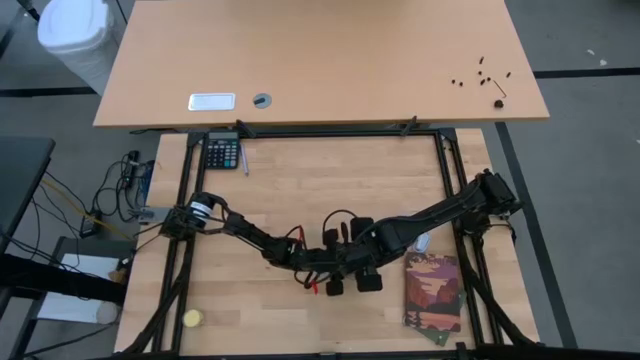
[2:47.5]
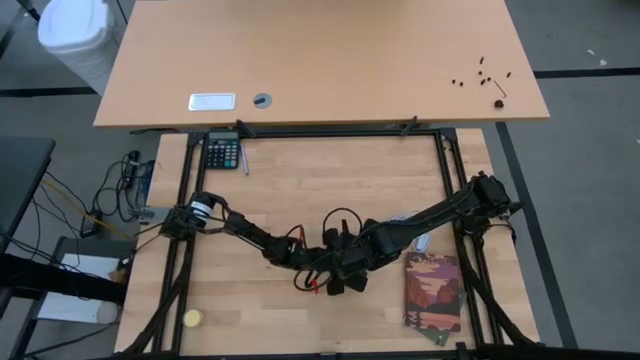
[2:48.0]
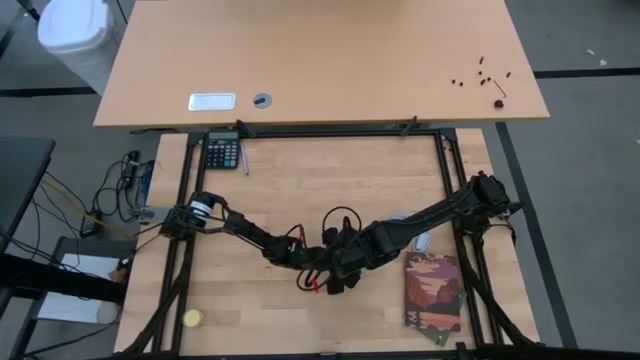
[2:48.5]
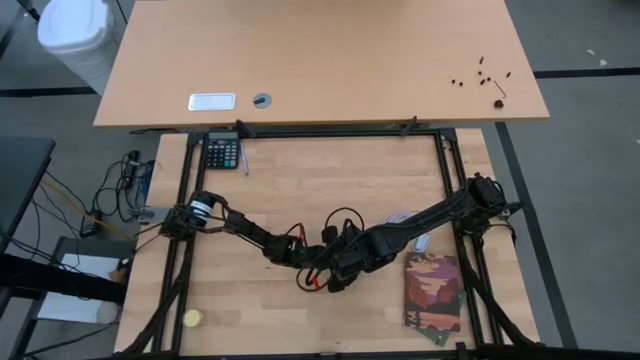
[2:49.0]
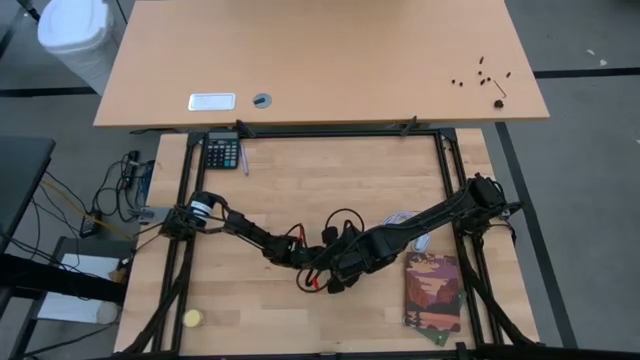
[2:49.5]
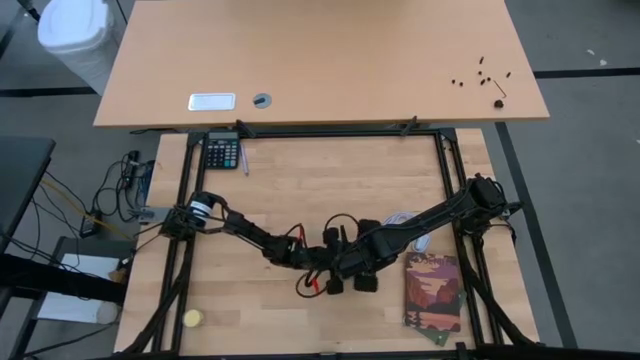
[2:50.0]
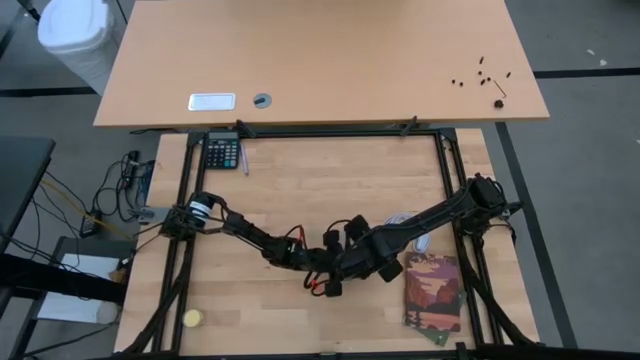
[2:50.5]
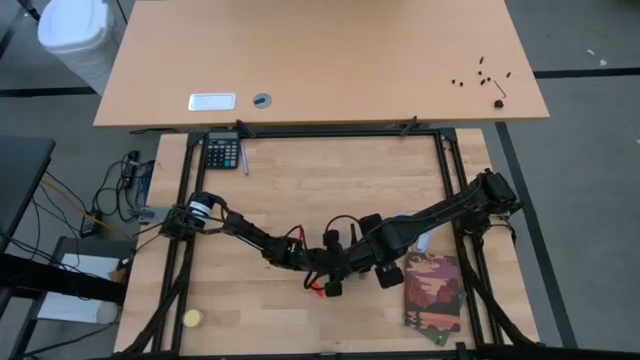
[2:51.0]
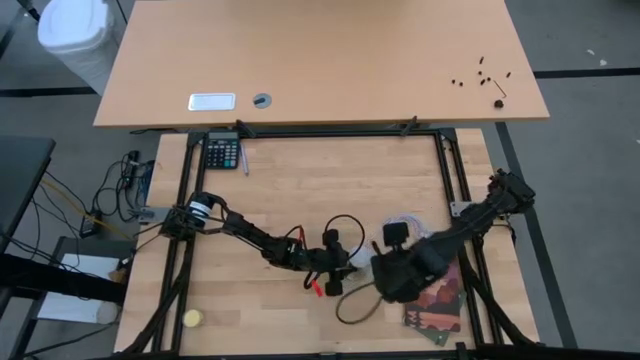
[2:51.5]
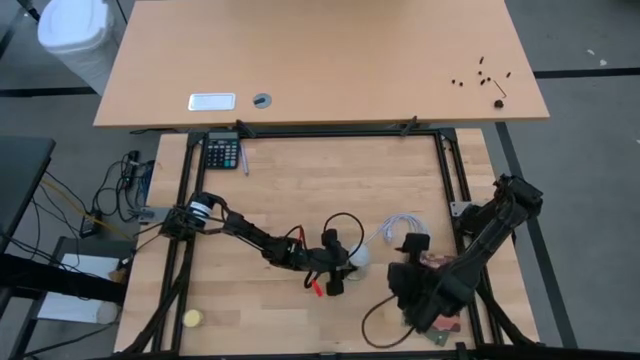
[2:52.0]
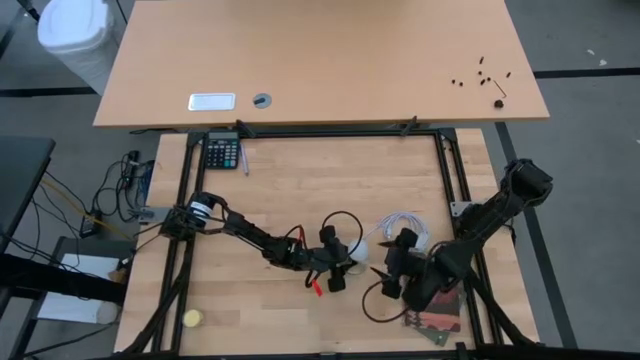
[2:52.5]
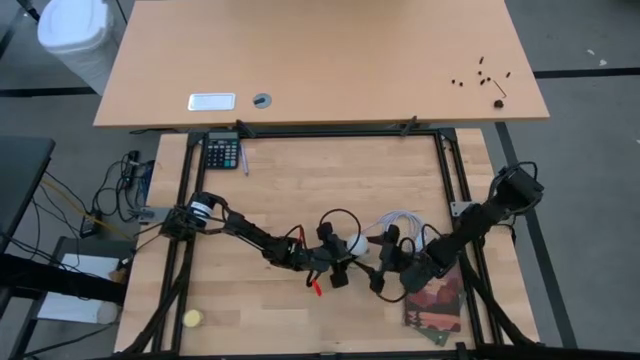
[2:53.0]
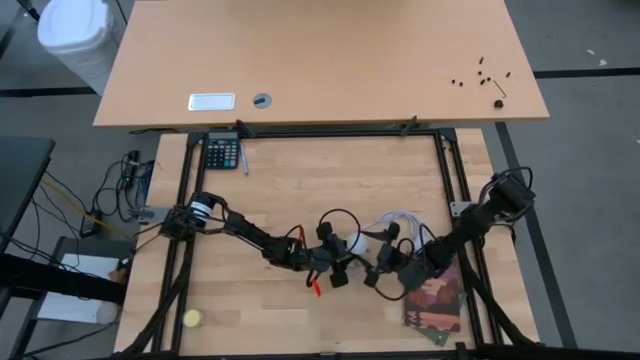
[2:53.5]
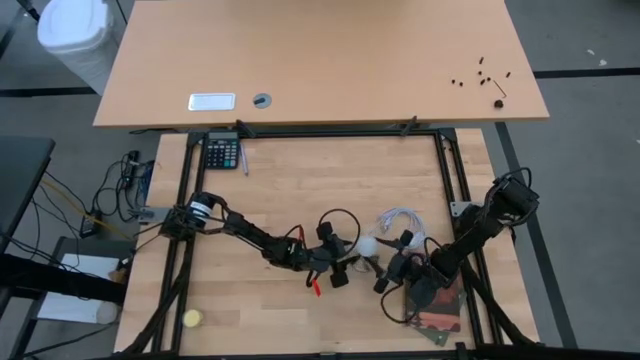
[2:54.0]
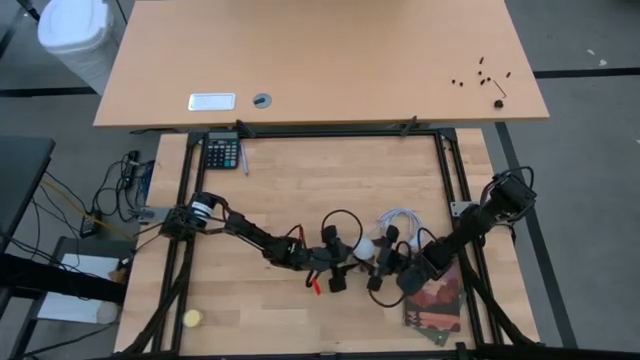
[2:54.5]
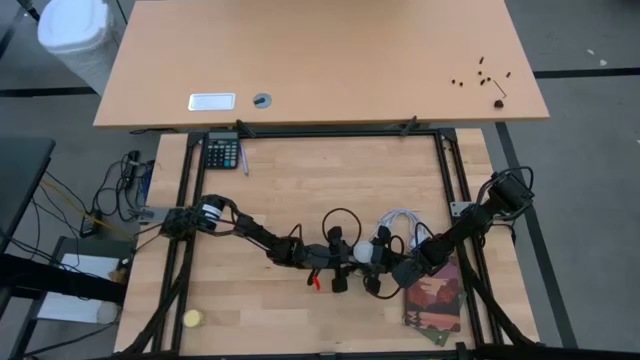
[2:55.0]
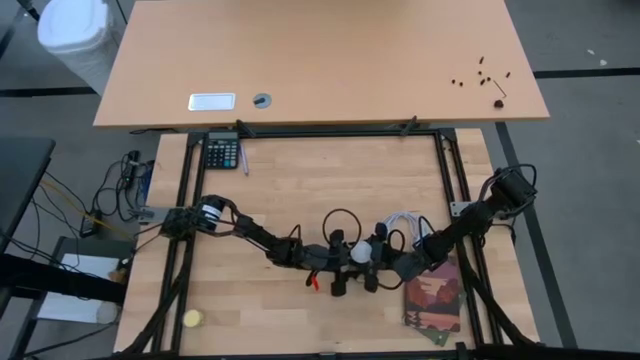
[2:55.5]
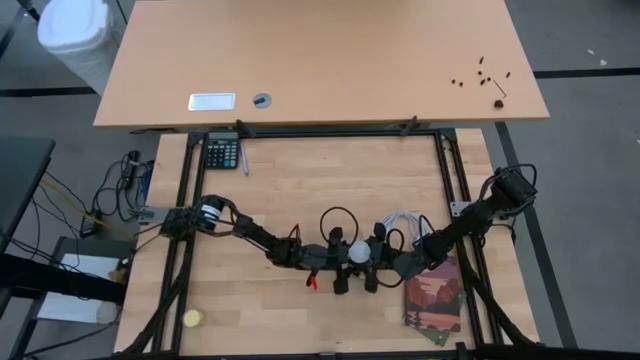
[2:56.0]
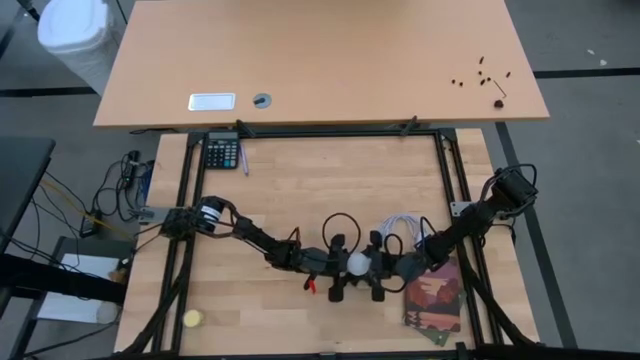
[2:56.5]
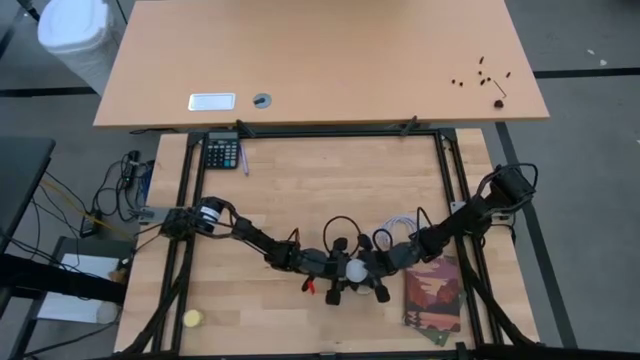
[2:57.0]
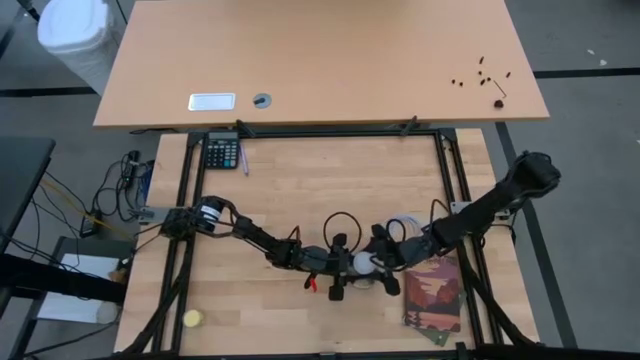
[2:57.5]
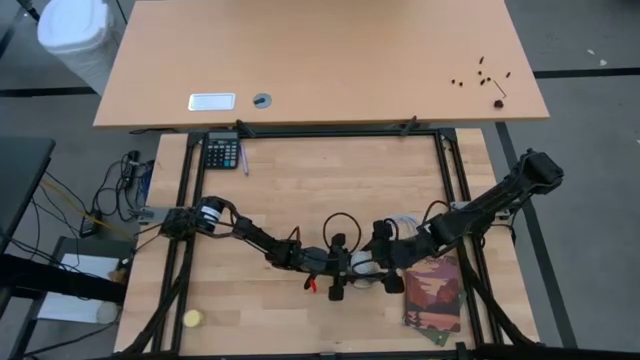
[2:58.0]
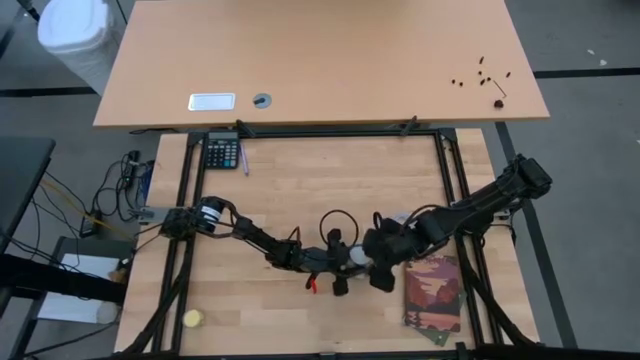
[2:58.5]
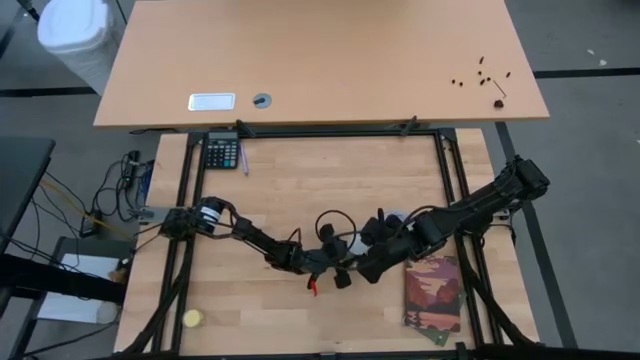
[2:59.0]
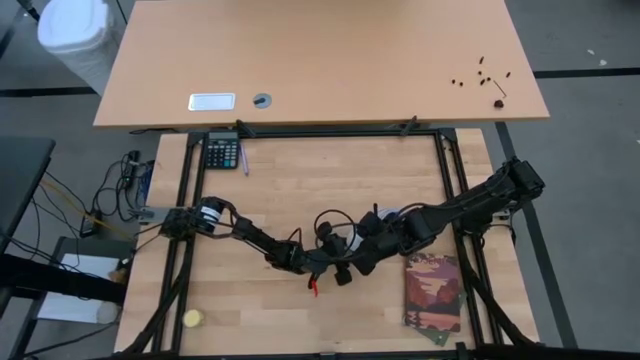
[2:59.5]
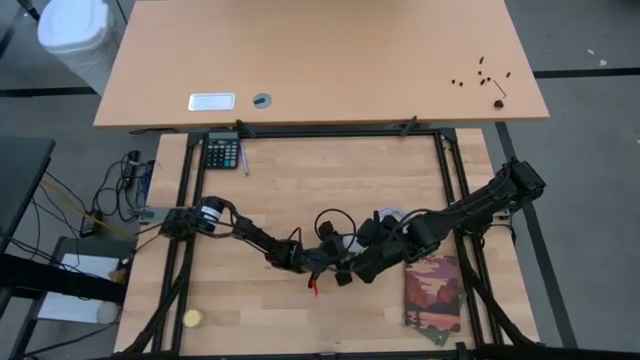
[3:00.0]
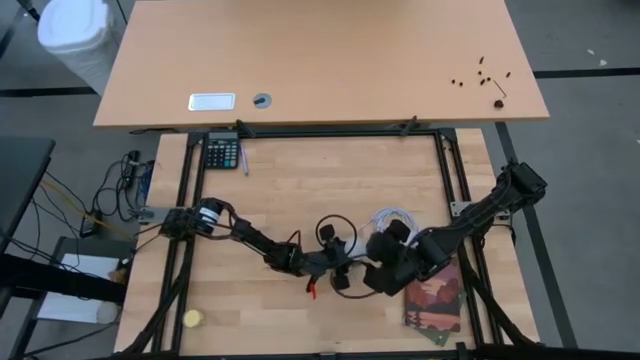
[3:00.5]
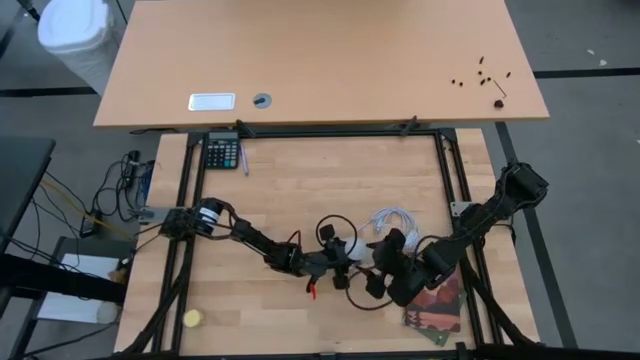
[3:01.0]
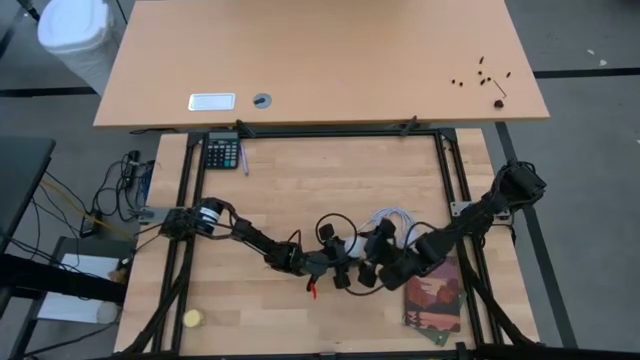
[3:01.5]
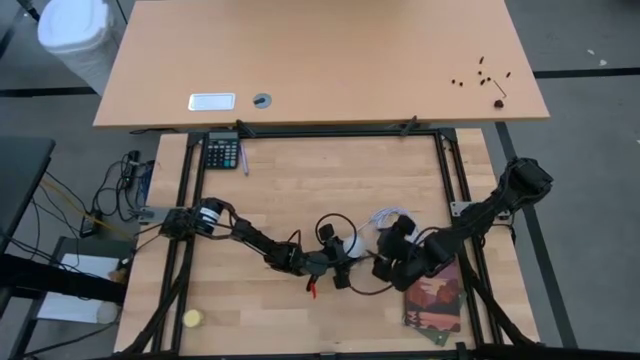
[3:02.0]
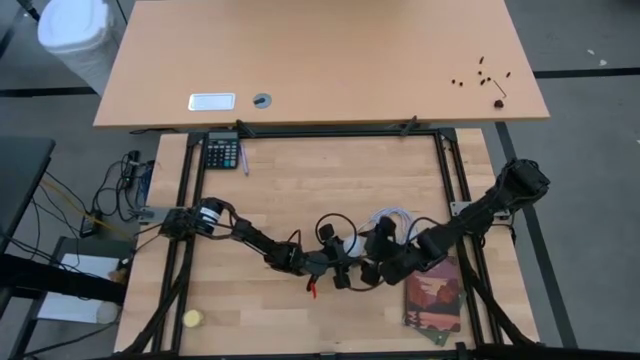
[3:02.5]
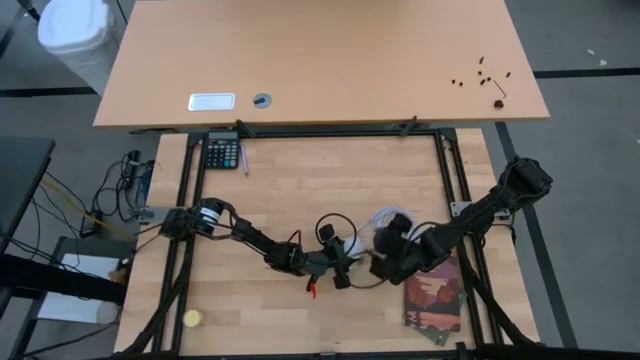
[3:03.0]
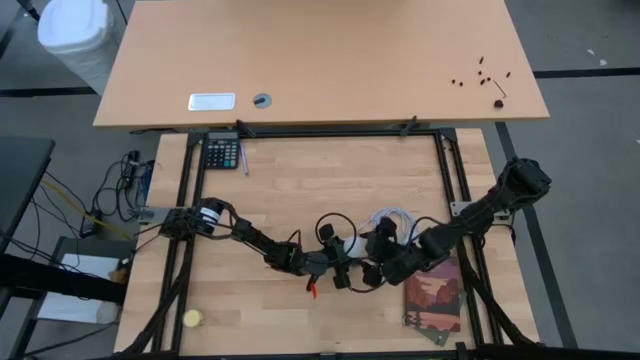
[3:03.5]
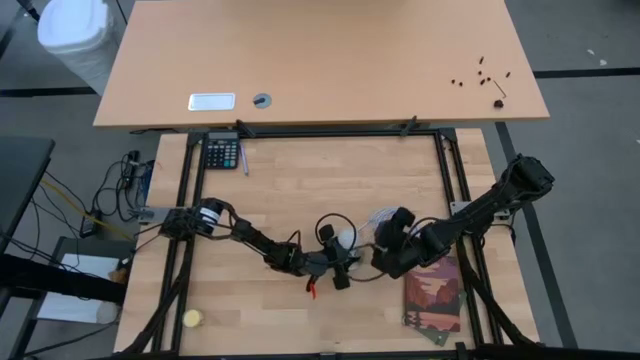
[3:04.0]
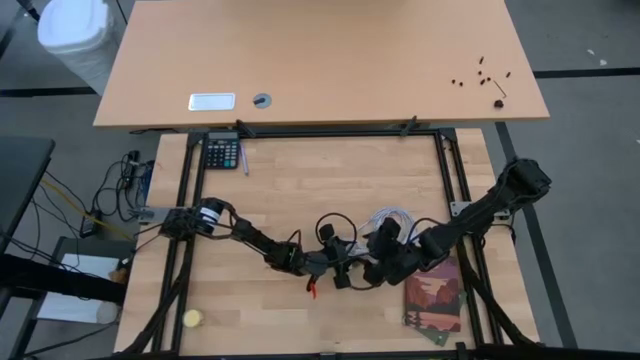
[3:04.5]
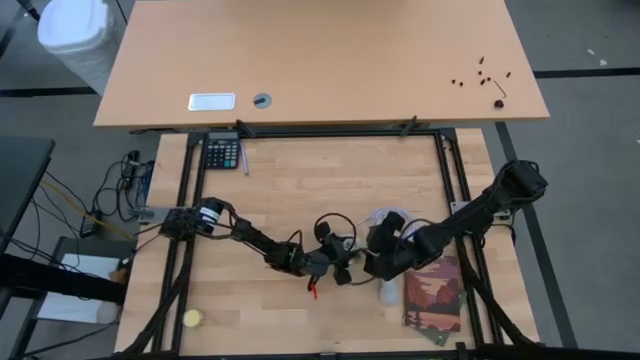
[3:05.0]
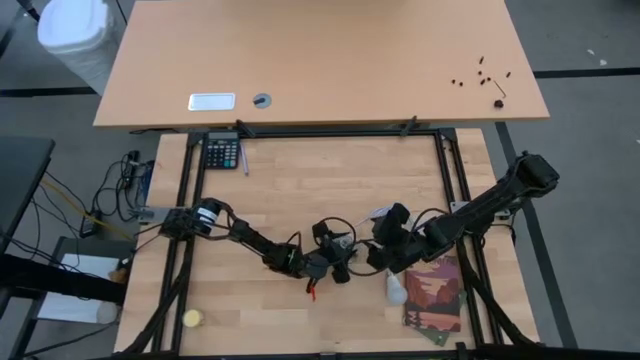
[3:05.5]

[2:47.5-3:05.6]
Task: Screw lightbulb
Remove the lightbulb from the lamp socket

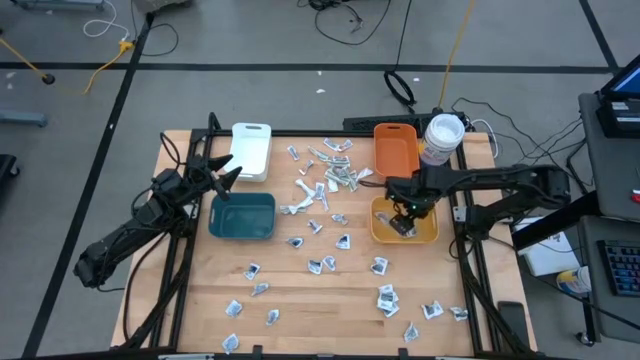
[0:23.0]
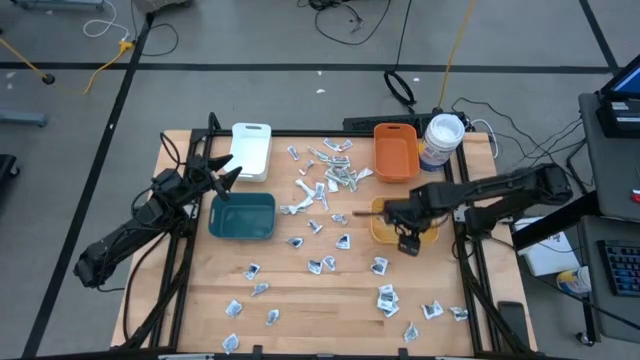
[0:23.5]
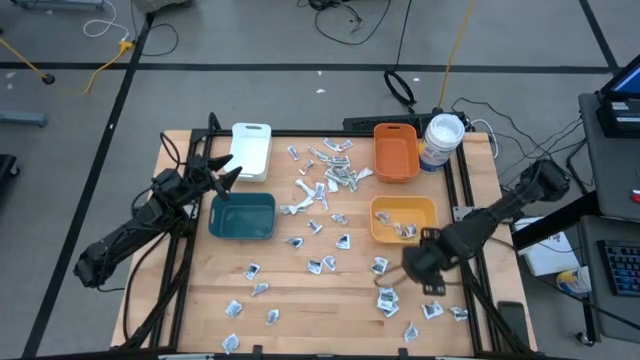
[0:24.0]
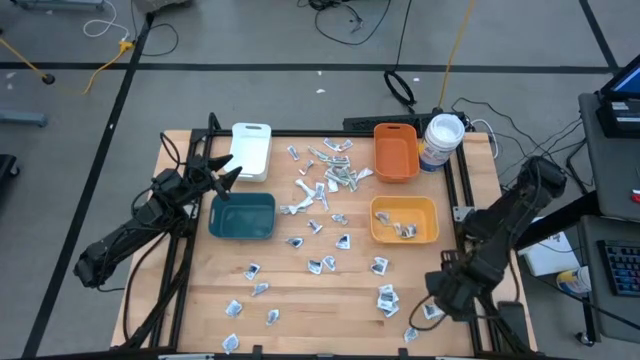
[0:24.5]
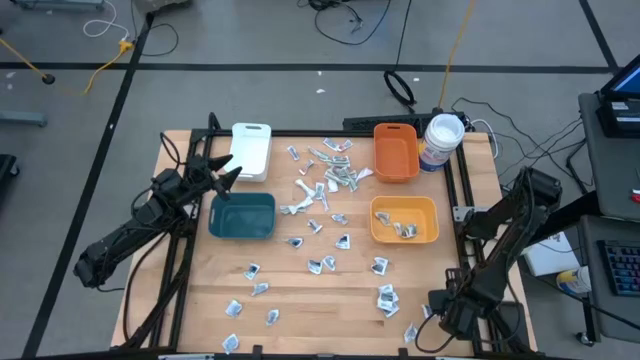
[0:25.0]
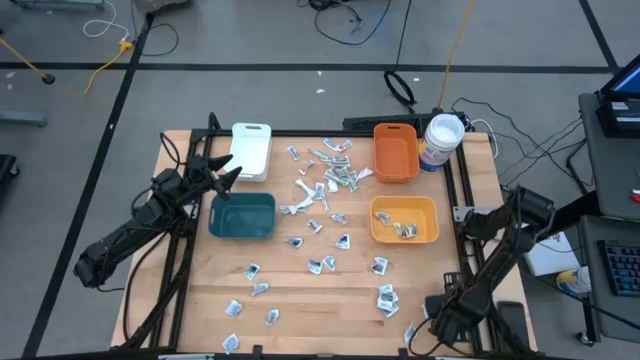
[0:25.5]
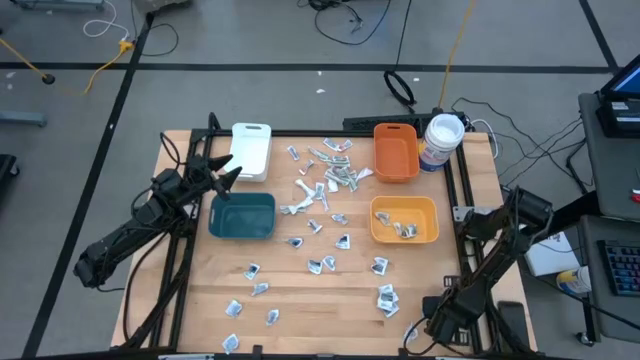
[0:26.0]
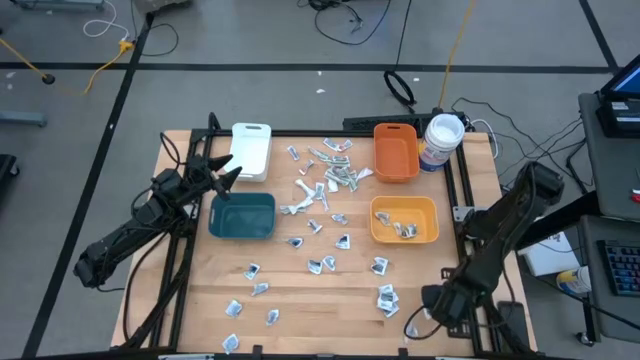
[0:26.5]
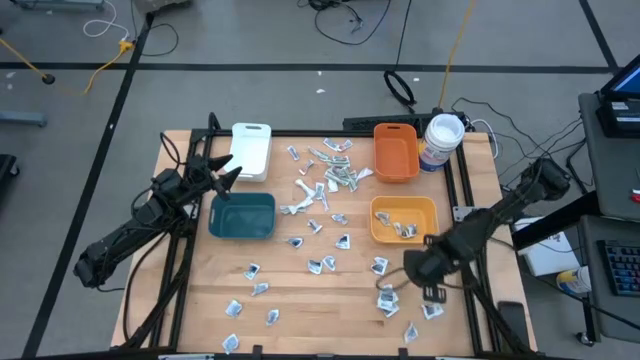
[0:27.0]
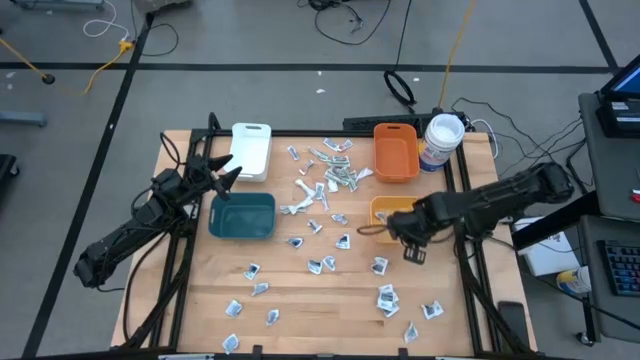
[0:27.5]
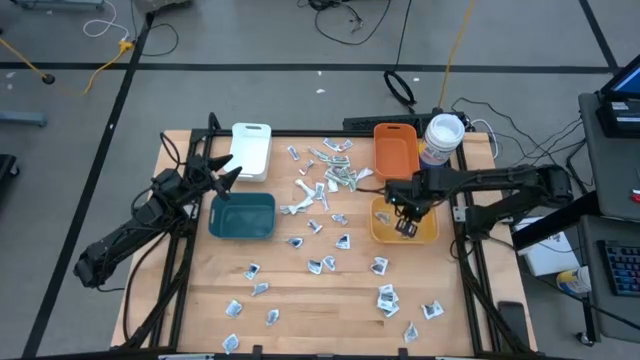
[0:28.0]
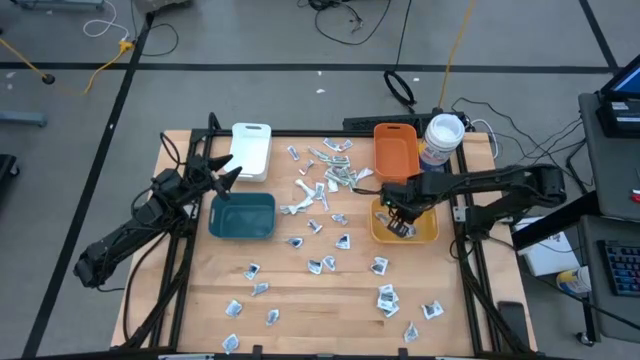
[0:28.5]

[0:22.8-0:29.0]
Task: Pick & Place First Aid Supplies
Put the antiseptic towelette into the yellow bin
